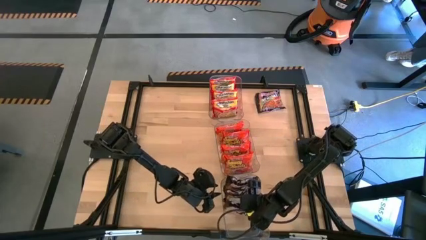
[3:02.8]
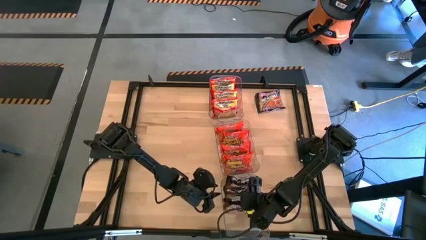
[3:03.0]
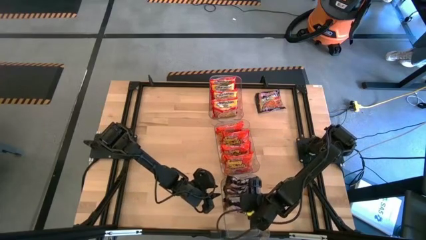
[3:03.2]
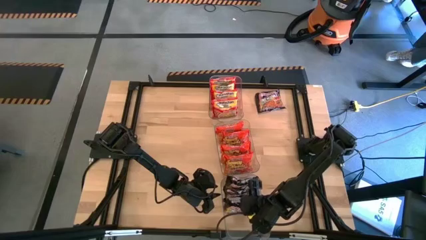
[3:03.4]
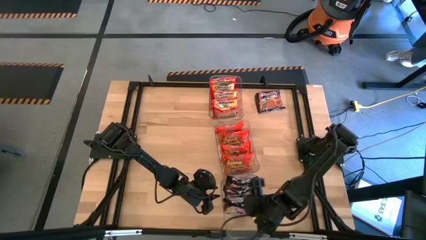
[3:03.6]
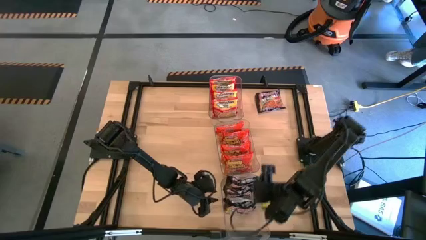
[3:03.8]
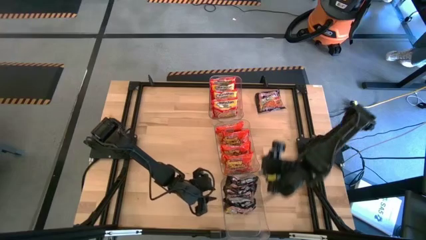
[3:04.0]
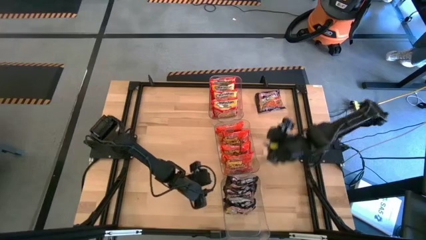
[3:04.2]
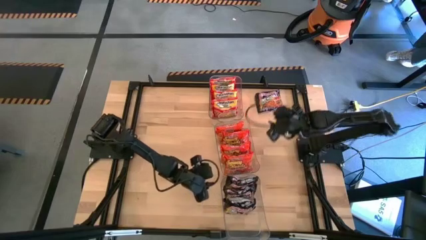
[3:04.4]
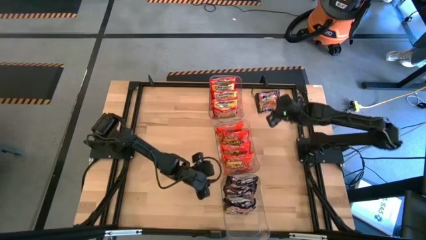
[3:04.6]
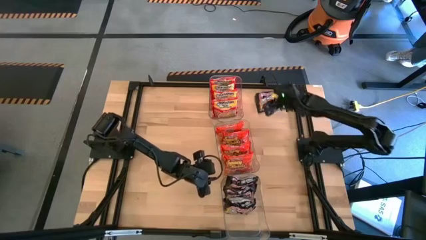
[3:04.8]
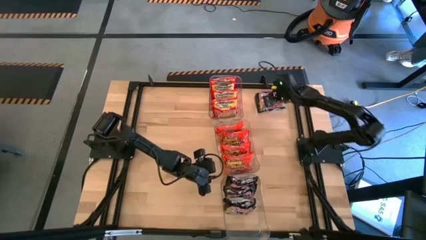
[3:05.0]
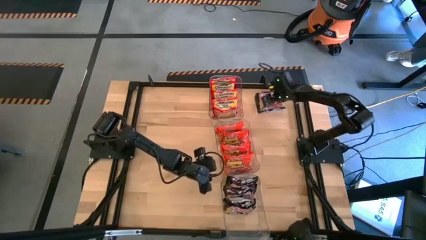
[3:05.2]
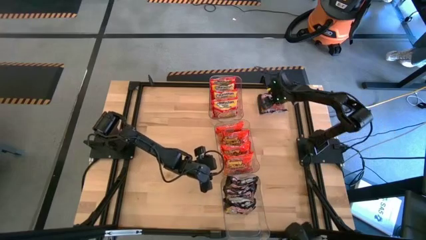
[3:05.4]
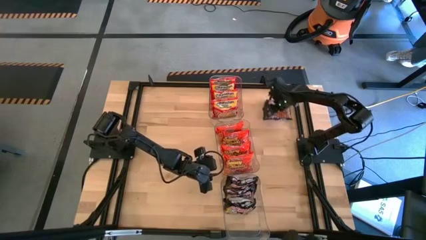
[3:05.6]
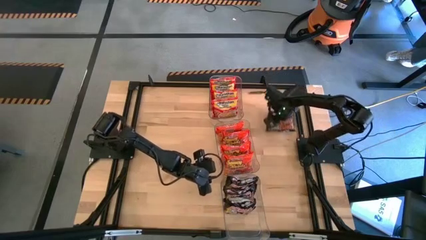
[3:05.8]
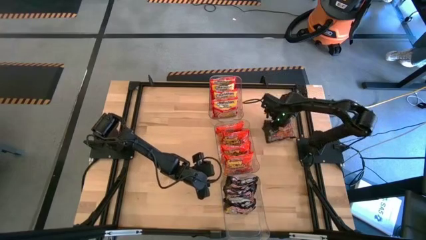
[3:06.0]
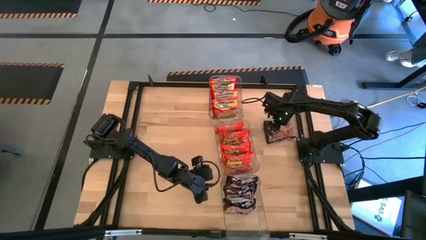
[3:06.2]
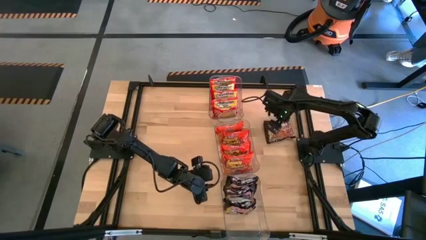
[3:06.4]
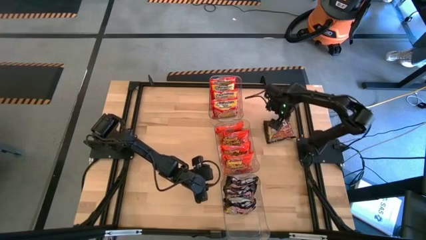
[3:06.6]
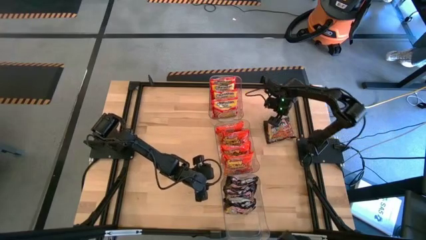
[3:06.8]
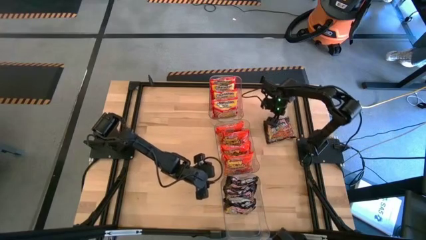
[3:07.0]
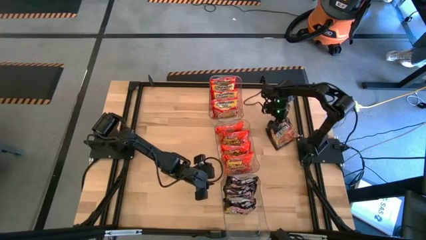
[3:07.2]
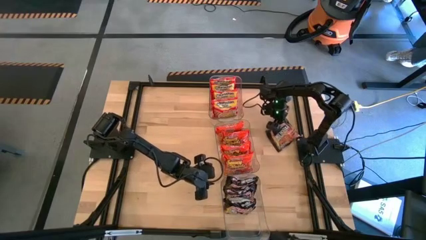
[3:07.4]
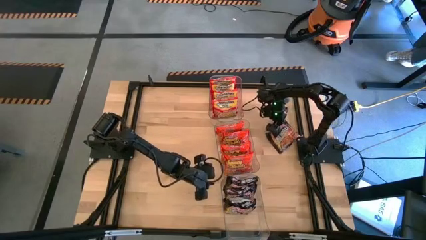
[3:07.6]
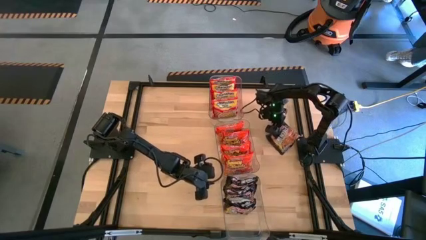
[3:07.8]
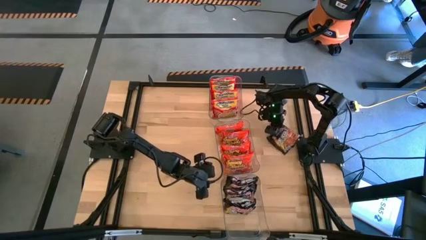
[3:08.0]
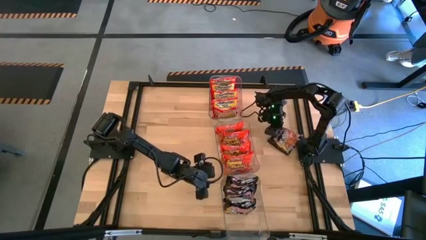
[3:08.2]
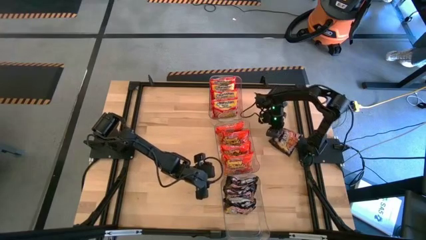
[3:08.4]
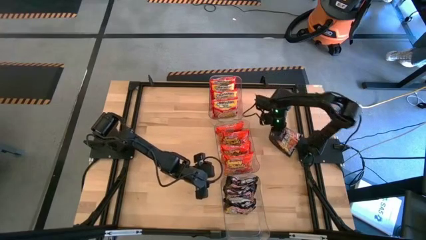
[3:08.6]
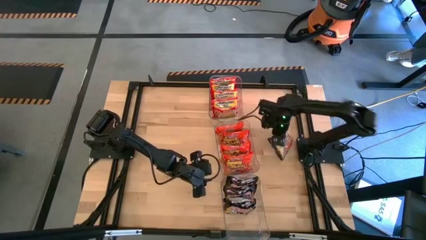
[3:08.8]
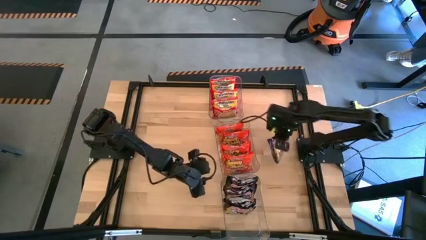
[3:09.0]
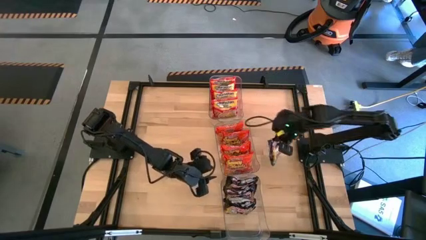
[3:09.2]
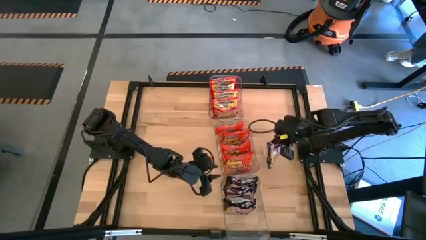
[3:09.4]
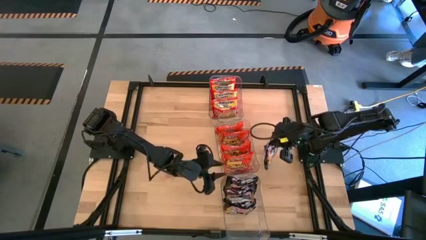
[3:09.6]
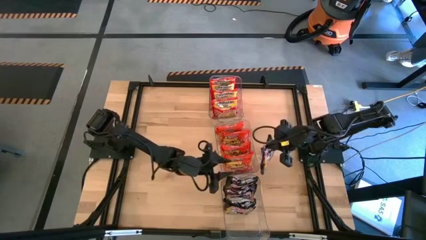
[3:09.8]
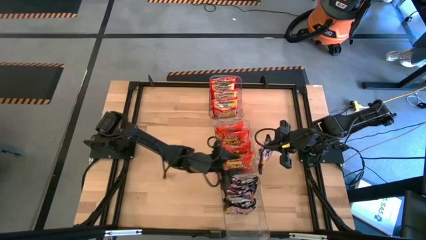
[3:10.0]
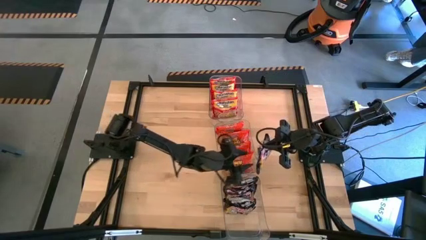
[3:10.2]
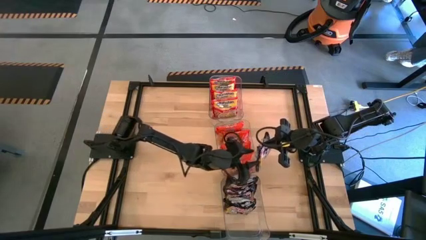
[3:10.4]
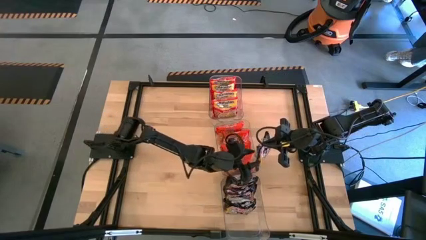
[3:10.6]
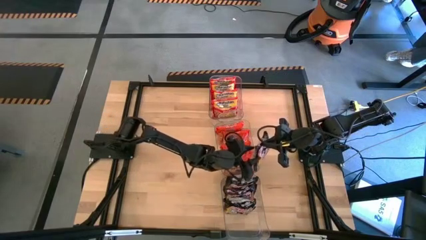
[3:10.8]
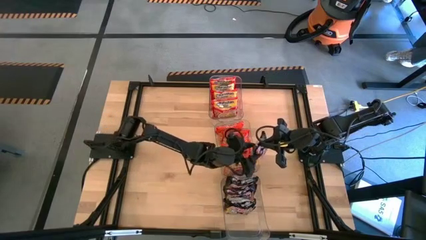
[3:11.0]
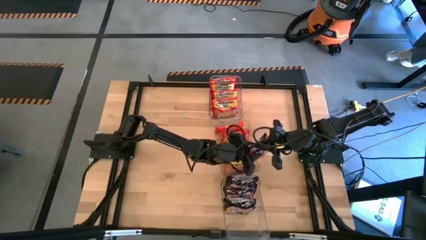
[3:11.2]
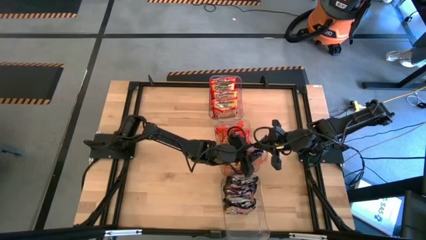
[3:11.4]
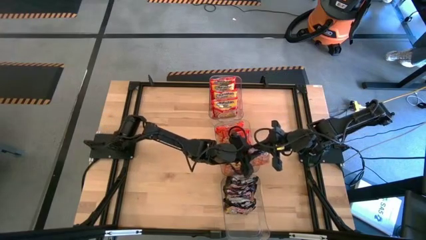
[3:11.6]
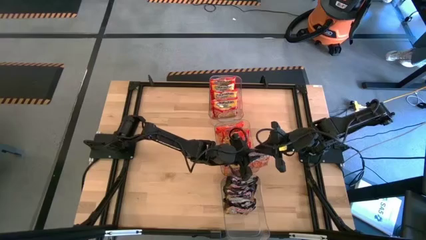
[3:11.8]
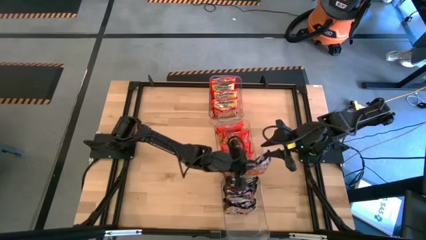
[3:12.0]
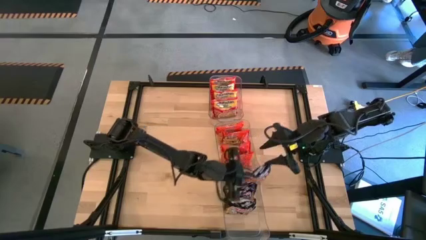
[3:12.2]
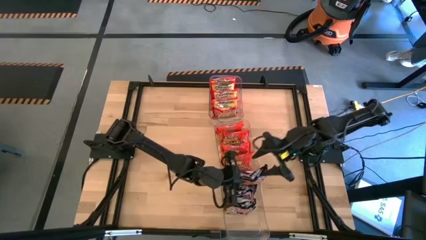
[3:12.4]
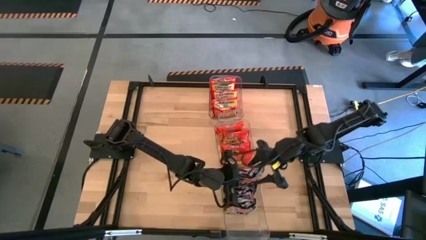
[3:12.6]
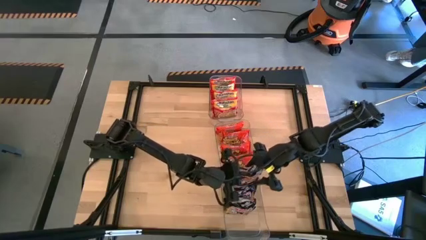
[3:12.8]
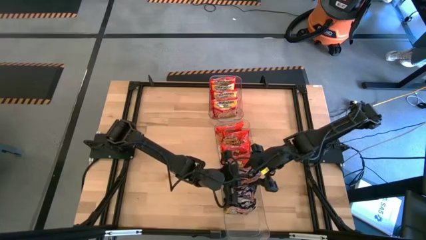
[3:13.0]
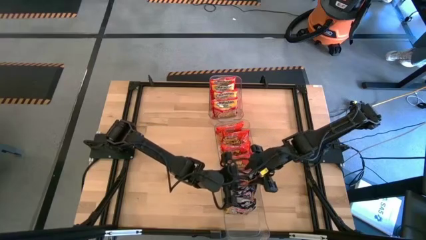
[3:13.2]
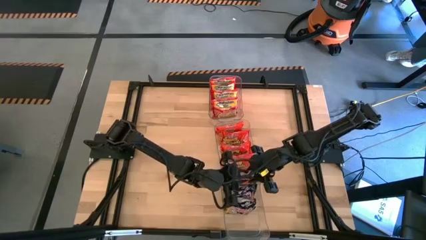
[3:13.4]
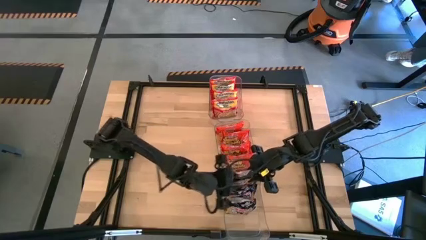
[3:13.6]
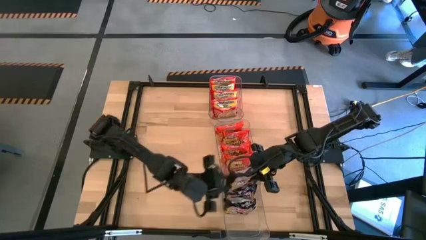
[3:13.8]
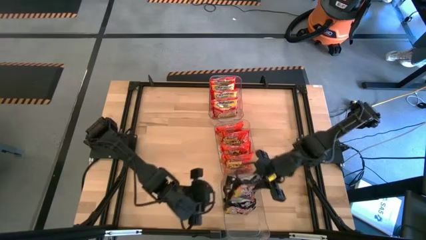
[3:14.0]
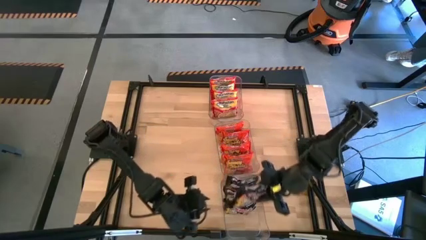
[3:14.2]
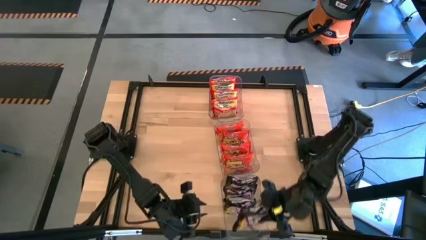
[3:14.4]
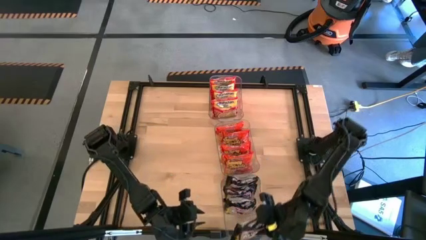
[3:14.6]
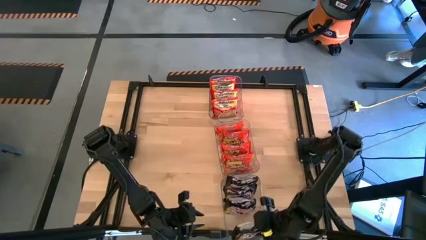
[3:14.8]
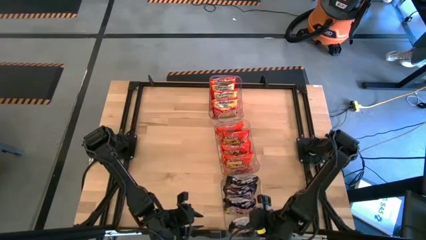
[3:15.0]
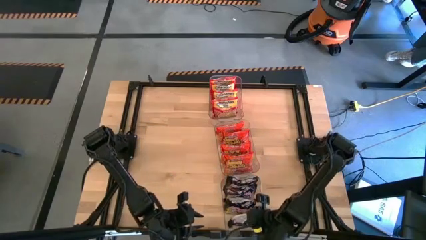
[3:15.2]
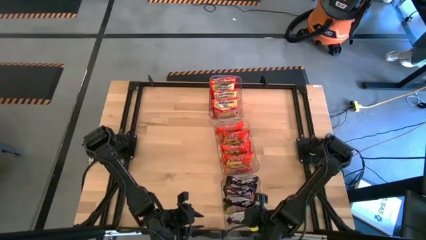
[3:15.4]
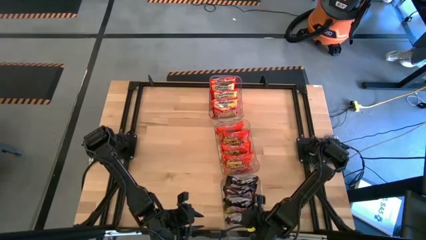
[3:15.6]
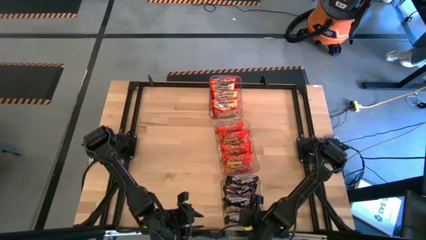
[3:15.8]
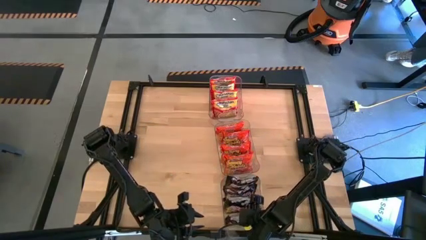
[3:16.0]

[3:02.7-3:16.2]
Task: Sort Maruchan noodles
Put the orange noodle pack into the middle transparent bin

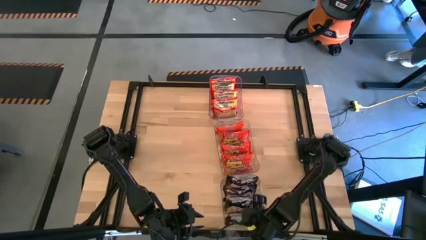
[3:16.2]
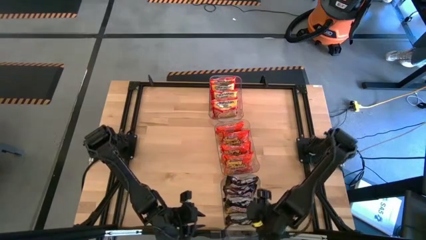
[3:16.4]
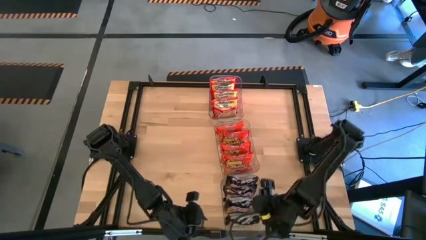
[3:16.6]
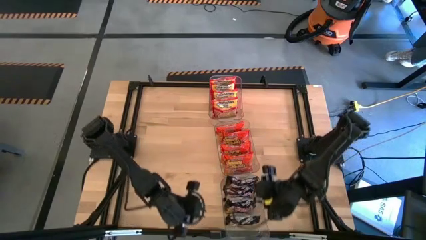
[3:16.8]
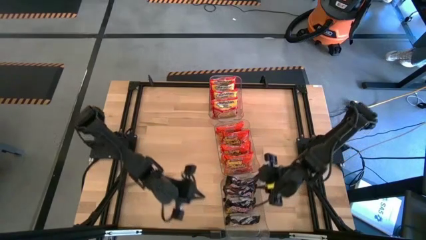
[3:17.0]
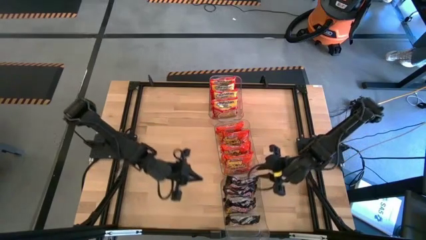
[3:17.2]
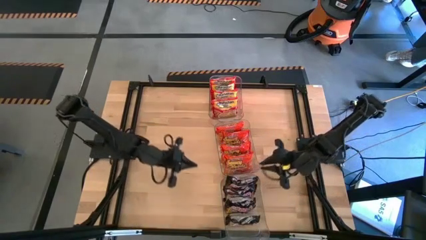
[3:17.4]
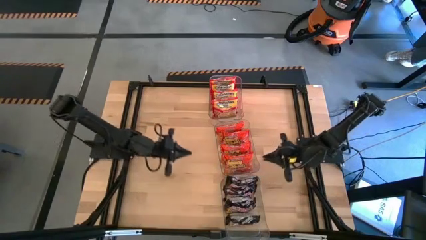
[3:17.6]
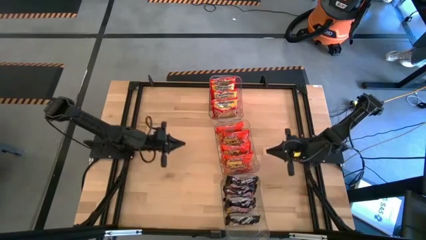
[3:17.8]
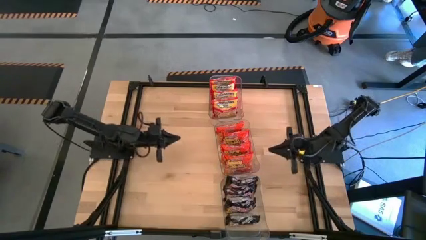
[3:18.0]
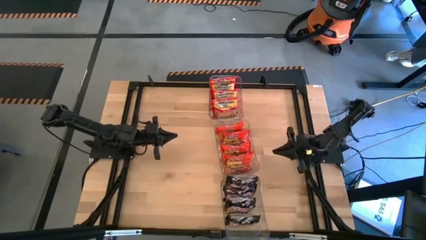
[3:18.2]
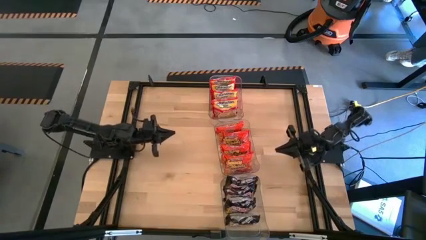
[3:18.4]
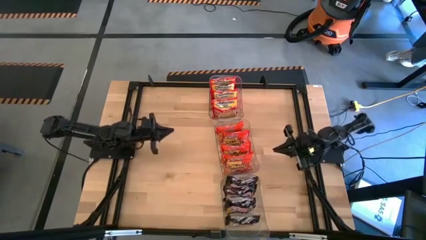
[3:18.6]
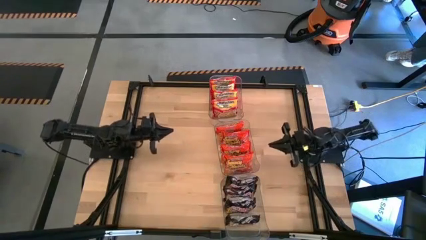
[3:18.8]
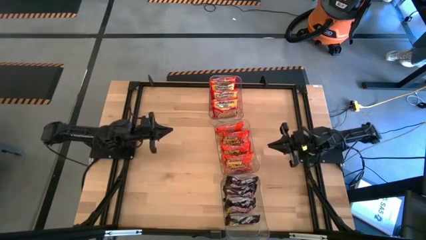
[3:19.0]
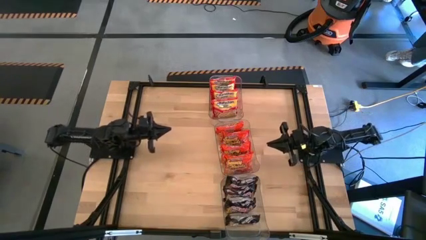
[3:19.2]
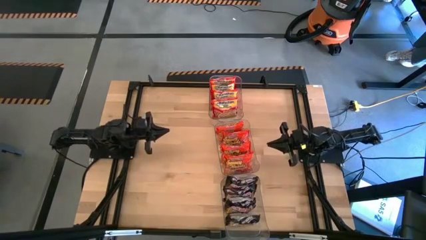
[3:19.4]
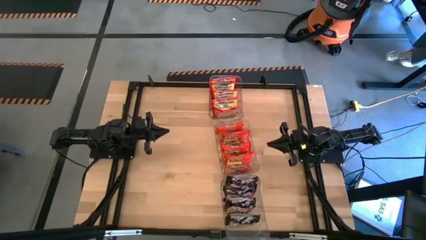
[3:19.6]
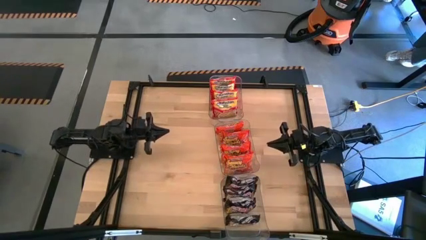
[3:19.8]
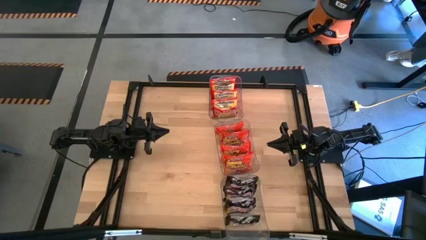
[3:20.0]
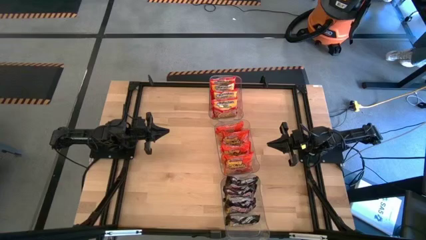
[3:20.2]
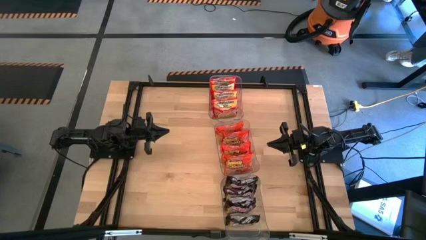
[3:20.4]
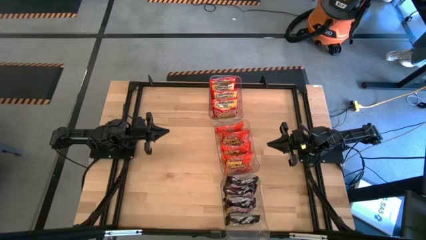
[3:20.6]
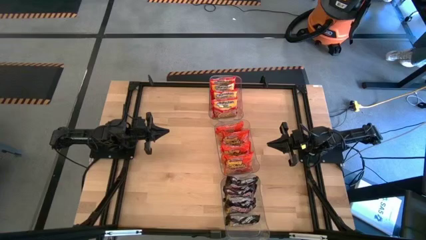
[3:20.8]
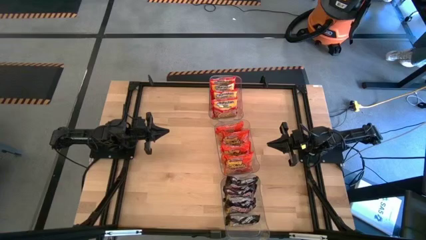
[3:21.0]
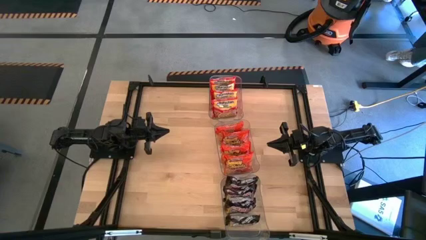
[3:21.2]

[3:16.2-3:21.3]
Return to Home Position
